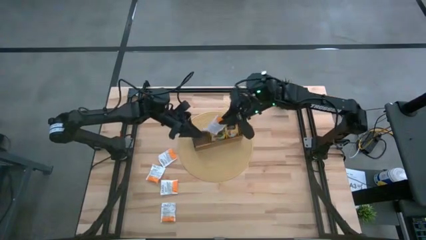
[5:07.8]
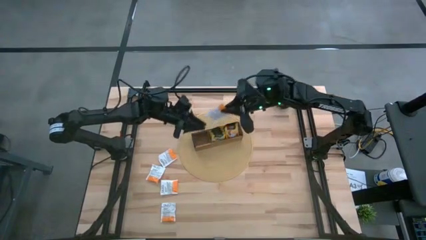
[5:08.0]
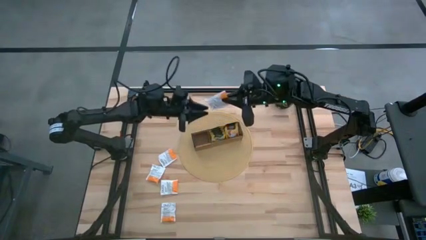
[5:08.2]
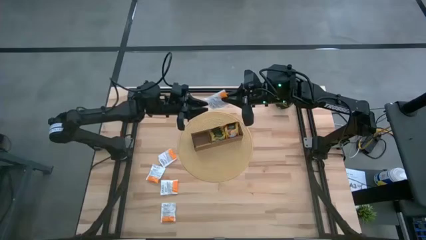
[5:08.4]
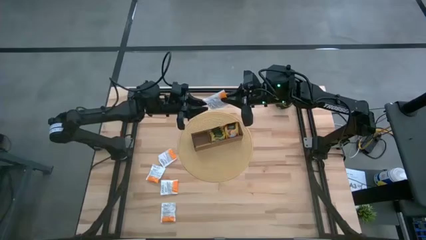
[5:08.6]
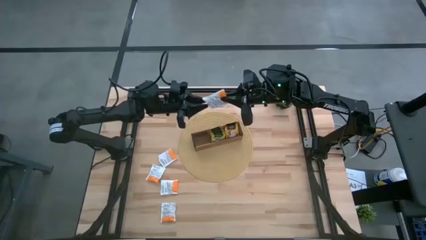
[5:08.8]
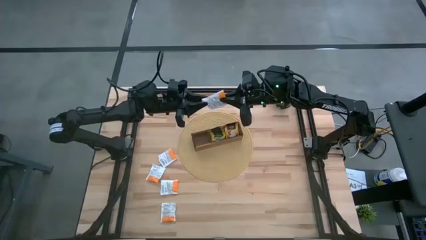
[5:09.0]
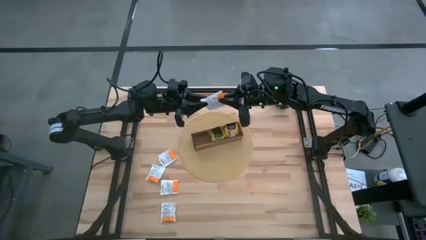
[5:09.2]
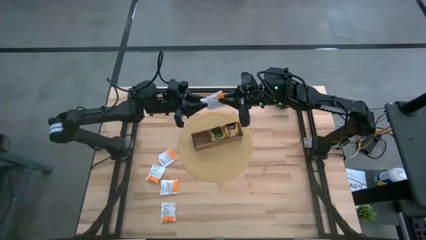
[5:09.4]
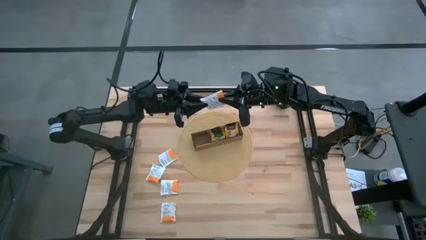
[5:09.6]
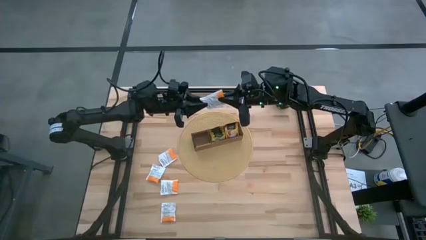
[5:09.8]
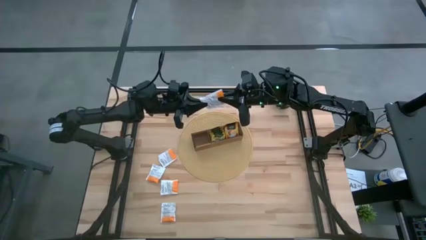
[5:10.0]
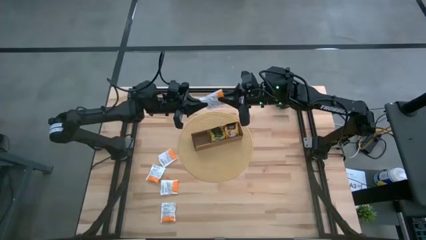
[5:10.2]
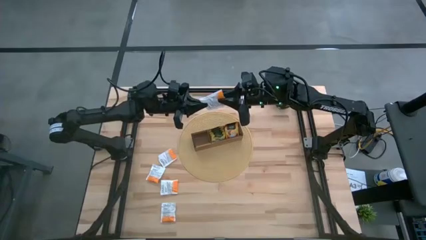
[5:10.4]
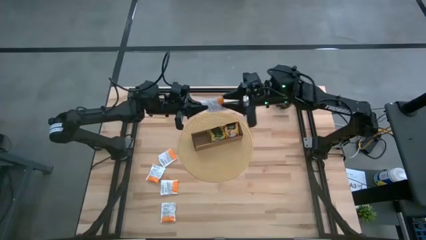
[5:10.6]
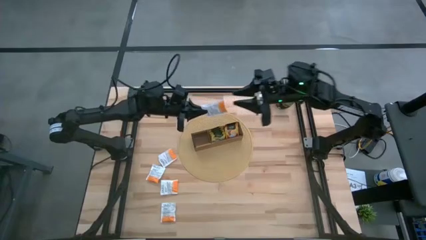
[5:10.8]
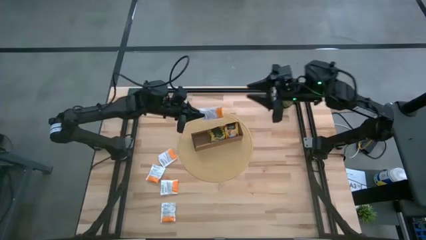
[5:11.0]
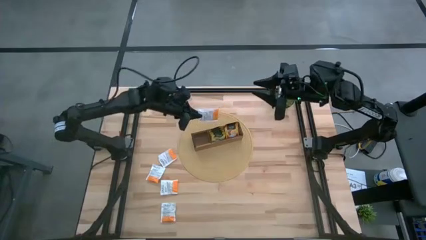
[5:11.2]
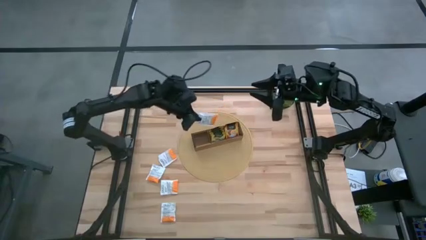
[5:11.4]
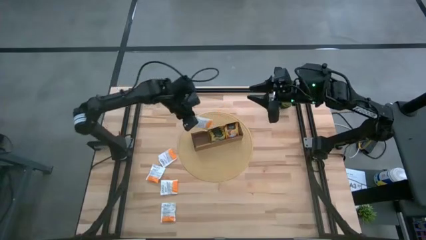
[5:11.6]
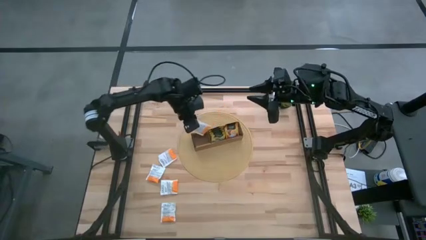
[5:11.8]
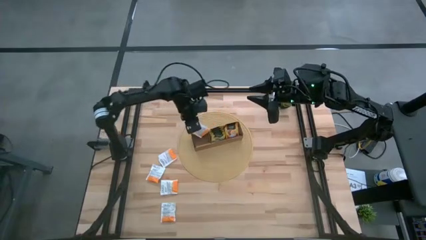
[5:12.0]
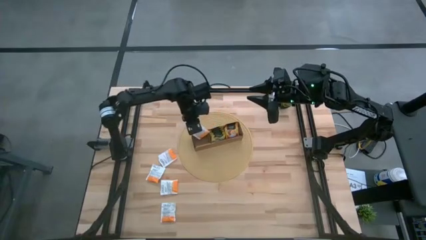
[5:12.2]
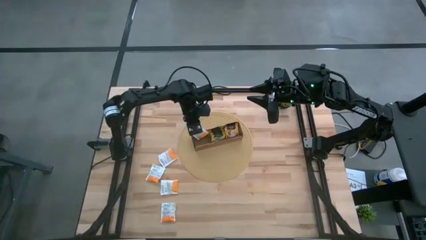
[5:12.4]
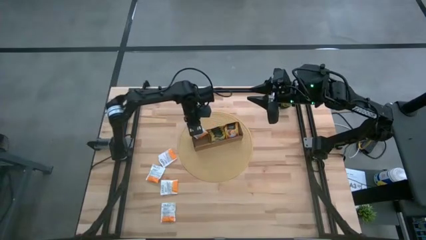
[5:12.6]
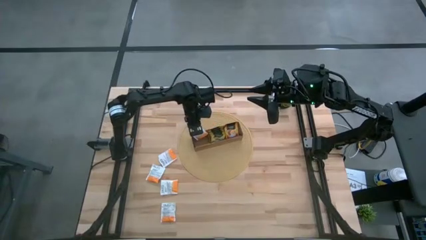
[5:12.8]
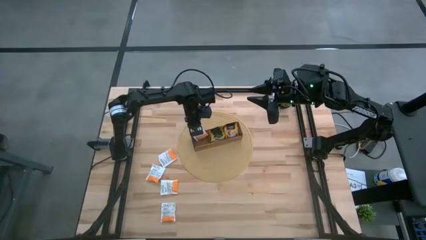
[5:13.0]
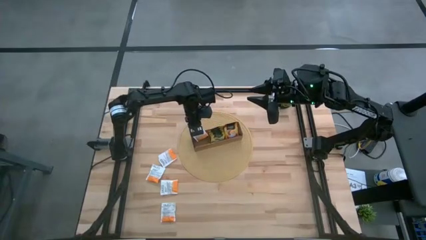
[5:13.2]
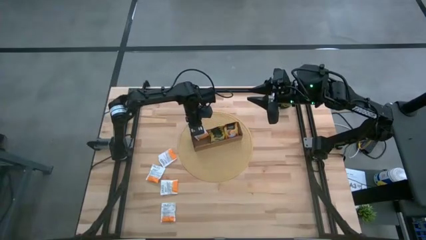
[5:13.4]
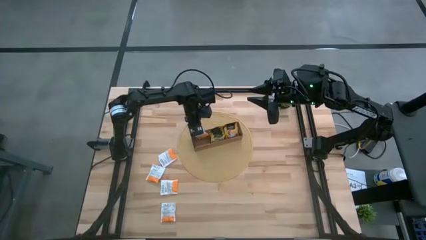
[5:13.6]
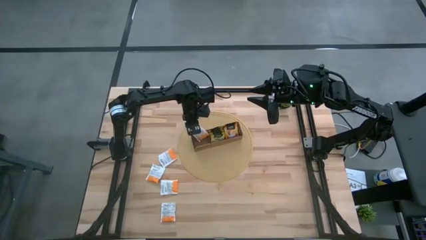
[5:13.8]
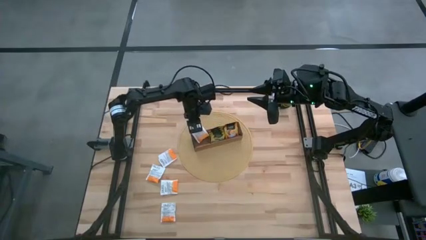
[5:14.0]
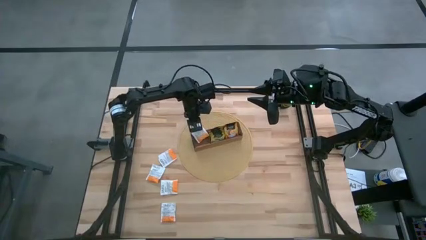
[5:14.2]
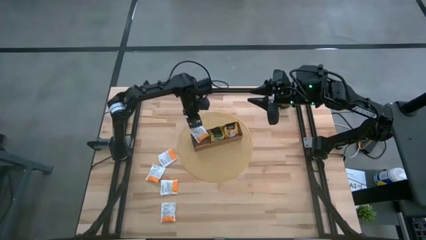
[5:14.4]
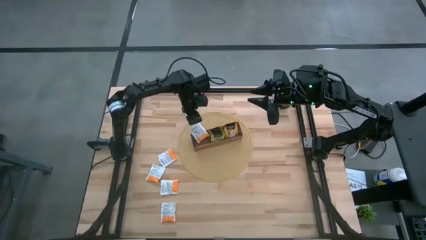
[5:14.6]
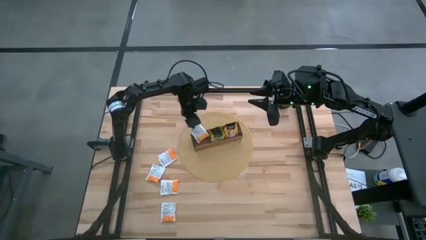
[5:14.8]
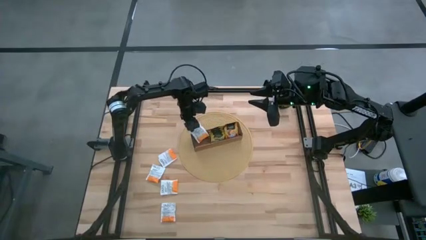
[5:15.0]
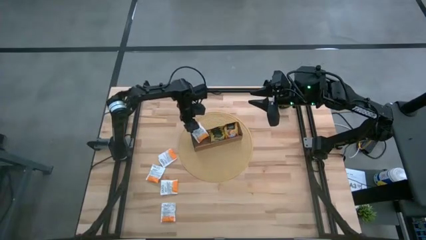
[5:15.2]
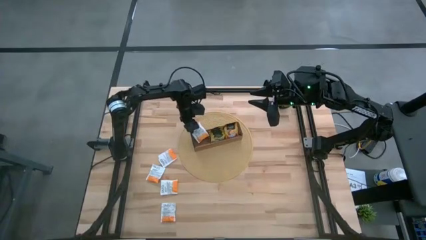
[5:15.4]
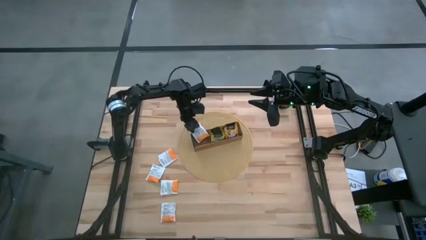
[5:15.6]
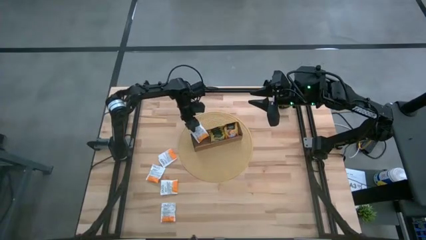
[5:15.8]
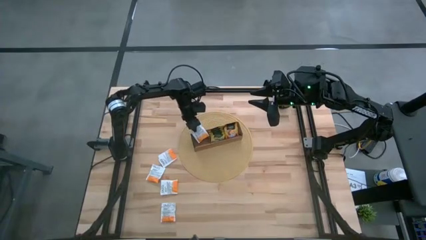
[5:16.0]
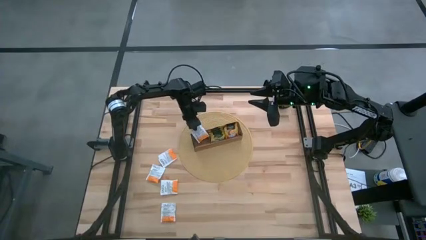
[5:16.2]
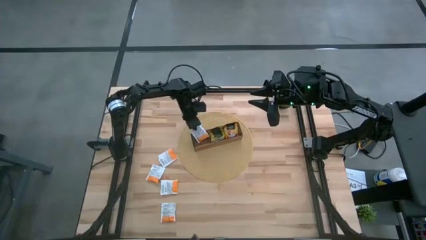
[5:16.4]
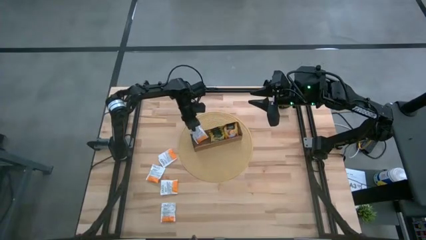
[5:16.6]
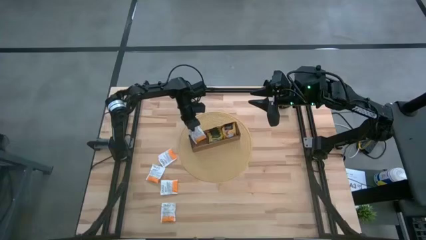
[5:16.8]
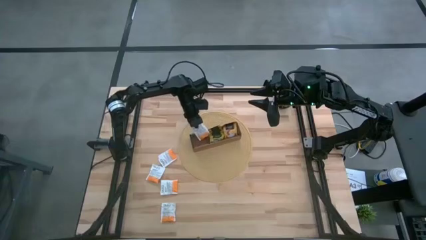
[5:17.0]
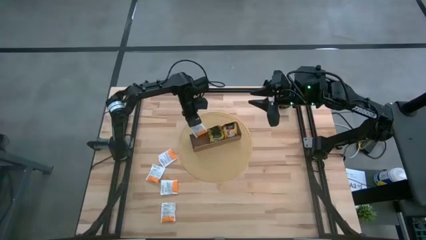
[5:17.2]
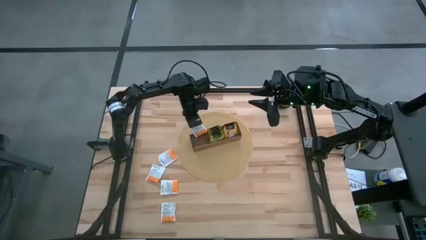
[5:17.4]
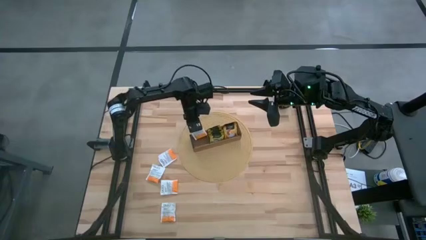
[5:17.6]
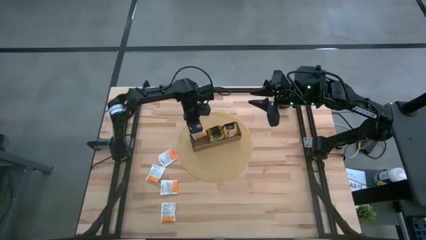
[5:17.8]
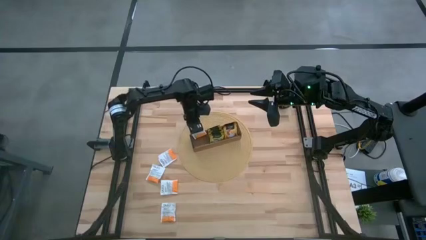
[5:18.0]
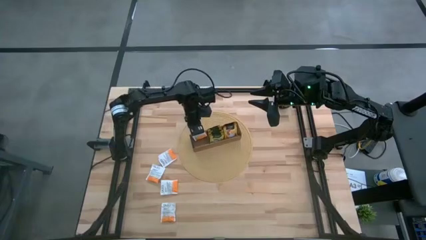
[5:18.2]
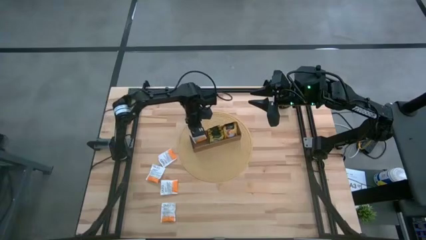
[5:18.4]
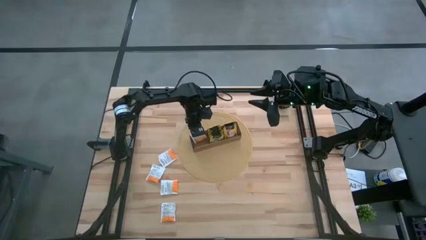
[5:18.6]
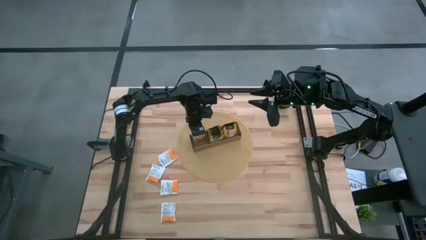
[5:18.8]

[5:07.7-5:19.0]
Task: Pick & Place Tea
Put the white tea bag into the left section of the wooden organizer

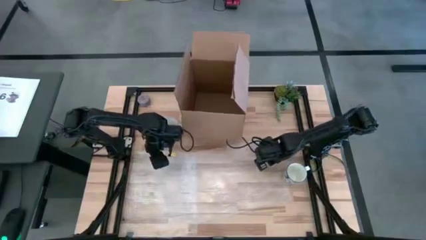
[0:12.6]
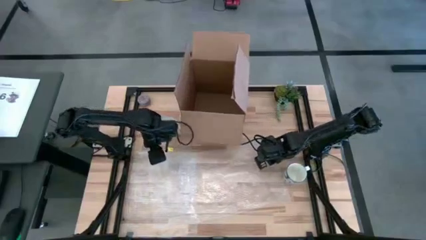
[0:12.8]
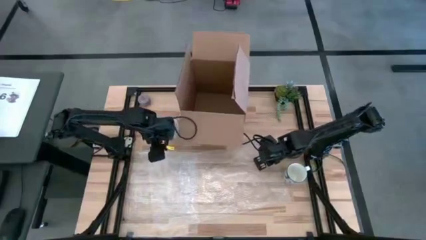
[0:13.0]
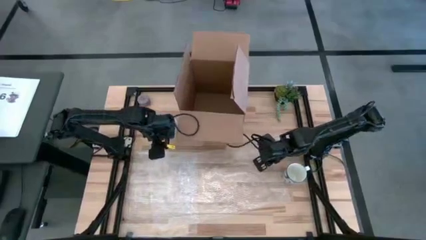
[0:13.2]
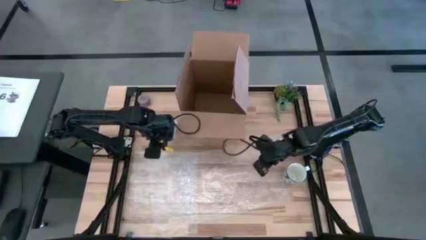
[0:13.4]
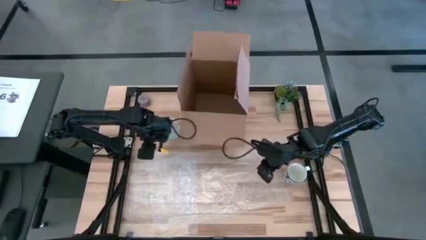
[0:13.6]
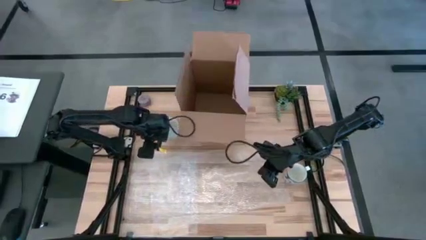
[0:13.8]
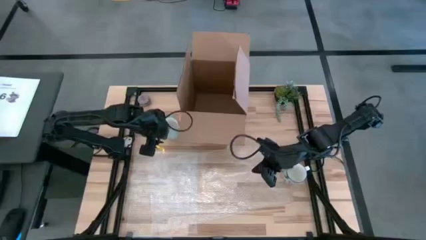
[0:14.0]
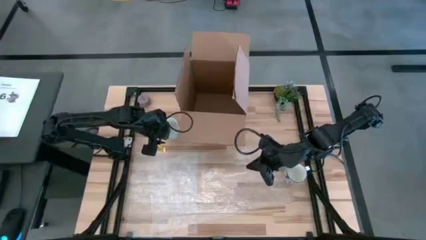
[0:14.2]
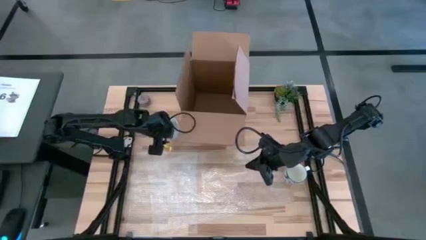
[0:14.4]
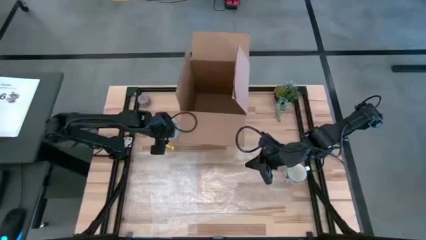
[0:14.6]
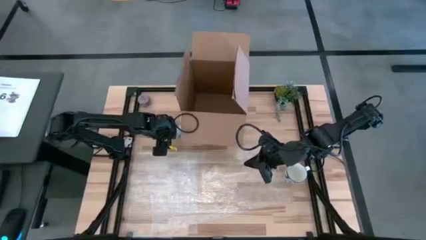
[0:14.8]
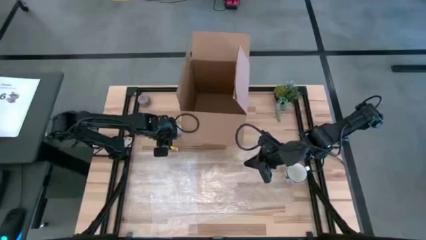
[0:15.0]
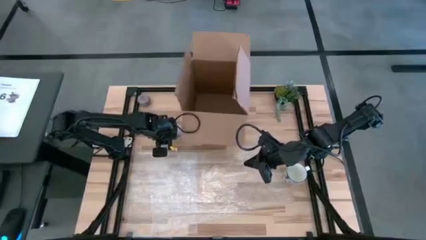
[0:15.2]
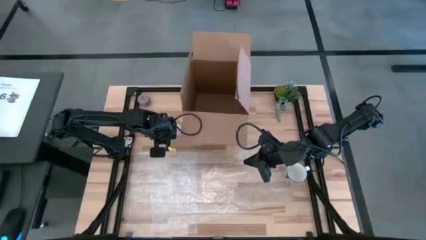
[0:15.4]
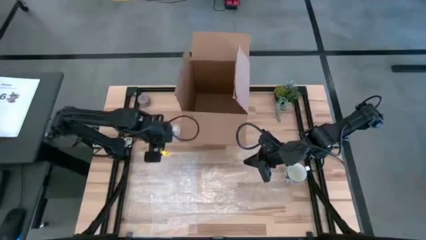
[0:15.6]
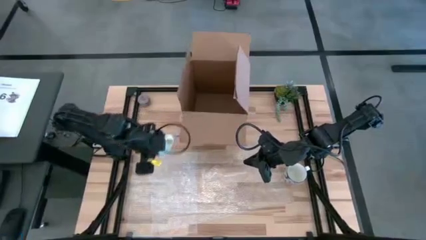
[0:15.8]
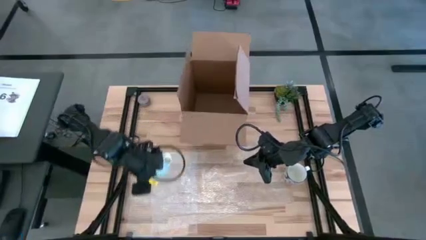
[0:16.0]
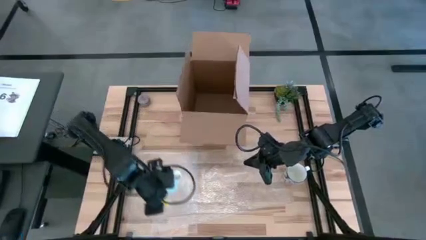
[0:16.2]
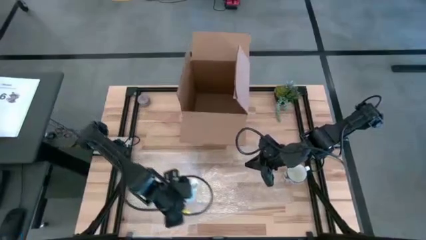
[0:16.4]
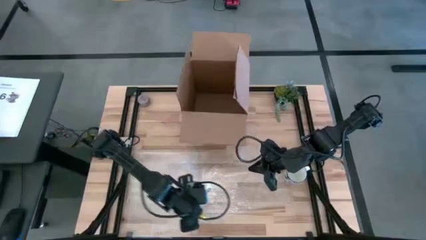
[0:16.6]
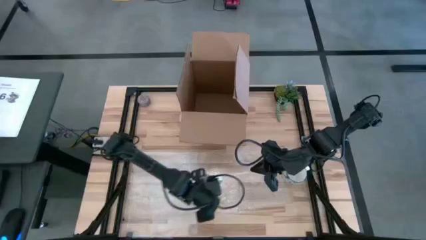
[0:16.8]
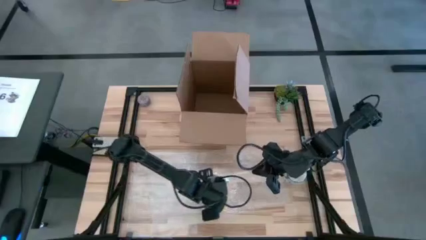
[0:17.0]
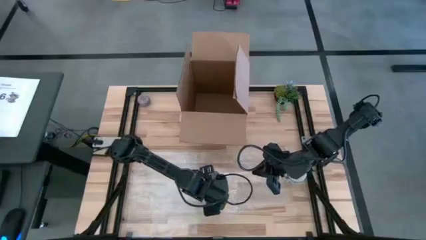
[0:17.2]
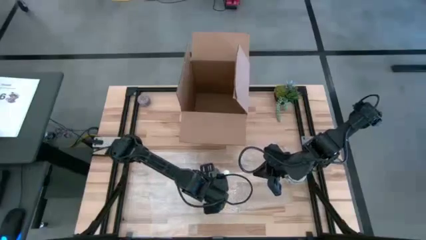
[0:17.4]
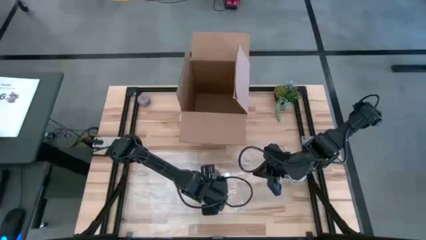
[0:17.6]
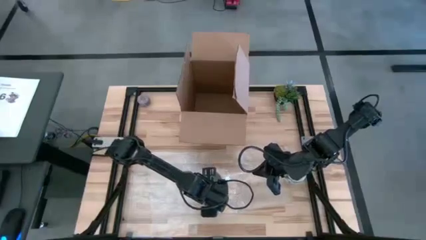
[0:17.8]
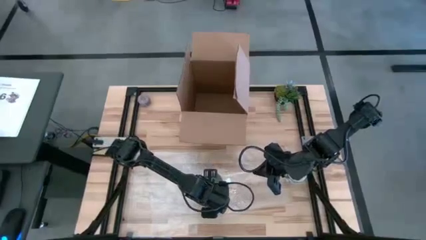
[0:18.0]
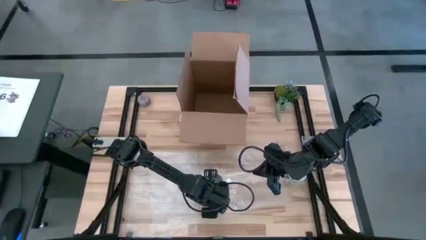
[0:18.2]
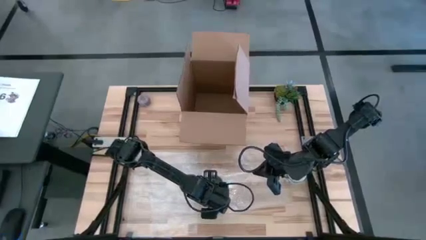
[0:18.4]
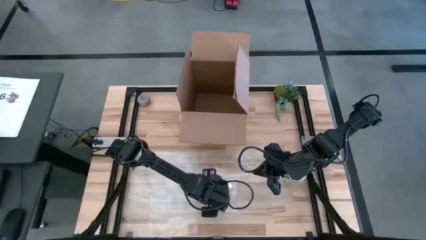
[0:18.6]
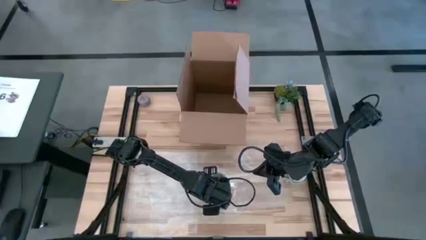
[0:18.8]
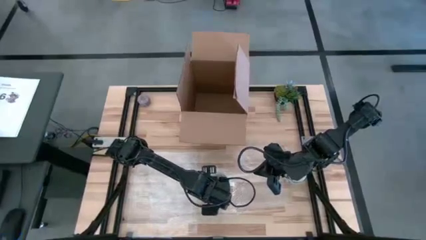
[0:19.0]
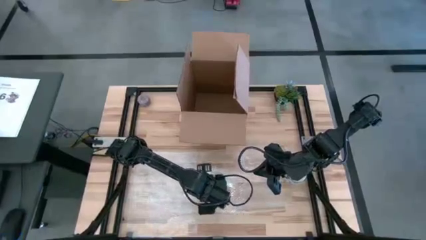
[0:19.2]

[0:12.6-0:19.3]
Task: wrap mug
Wrap the blue patterned mug with the right transparent bubble wrap
